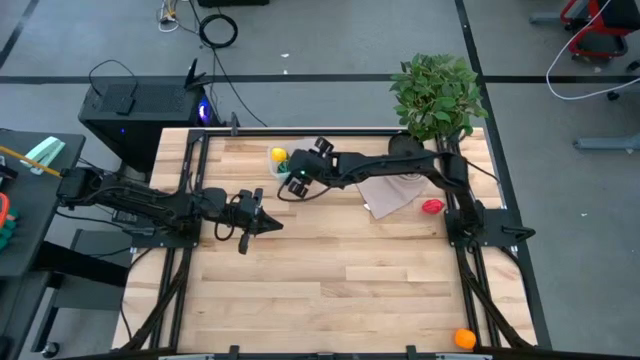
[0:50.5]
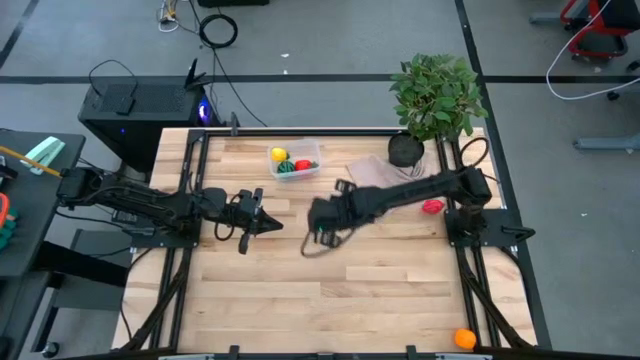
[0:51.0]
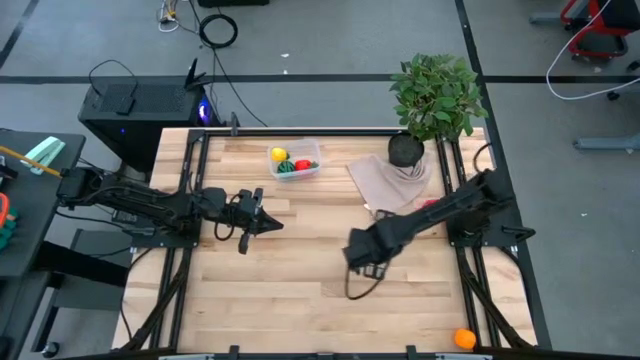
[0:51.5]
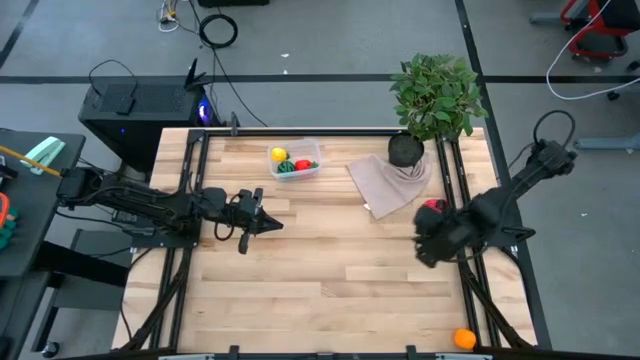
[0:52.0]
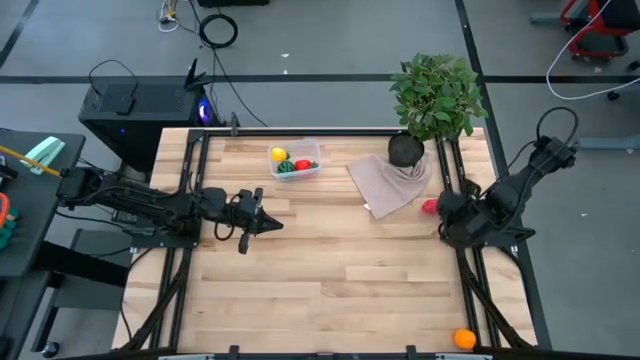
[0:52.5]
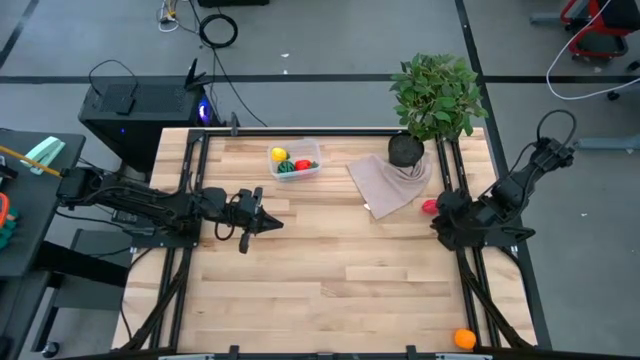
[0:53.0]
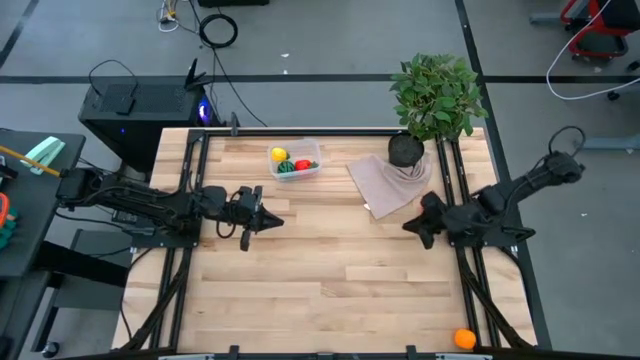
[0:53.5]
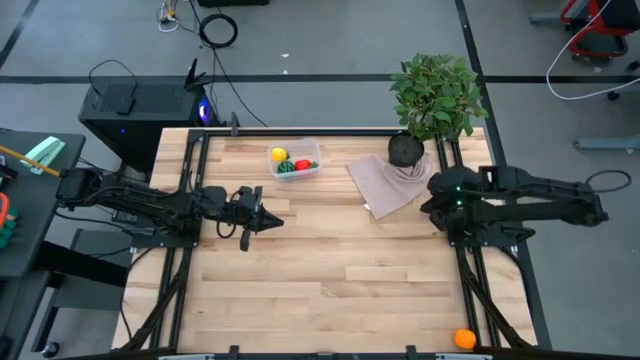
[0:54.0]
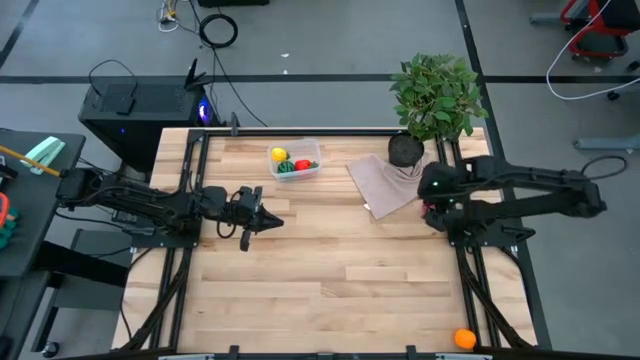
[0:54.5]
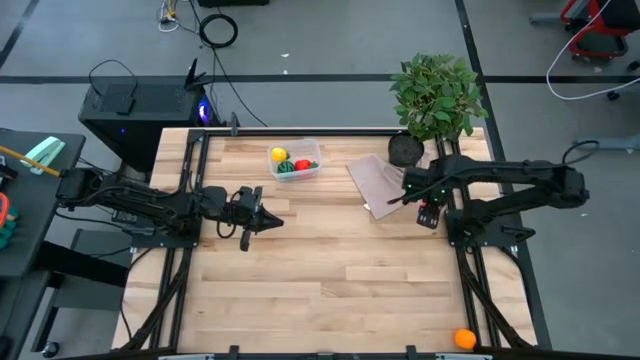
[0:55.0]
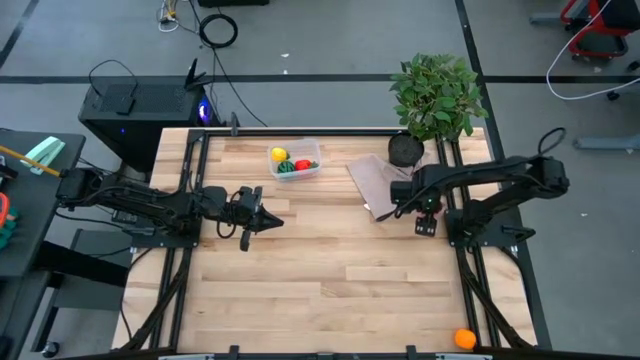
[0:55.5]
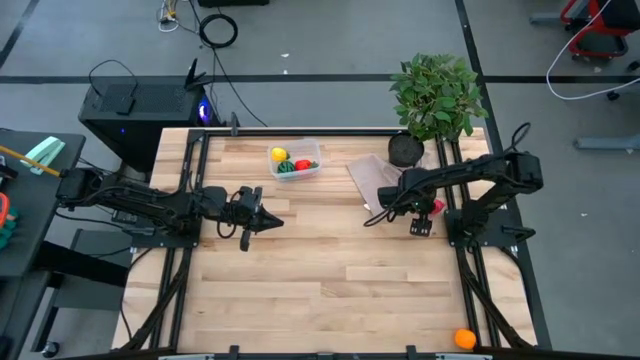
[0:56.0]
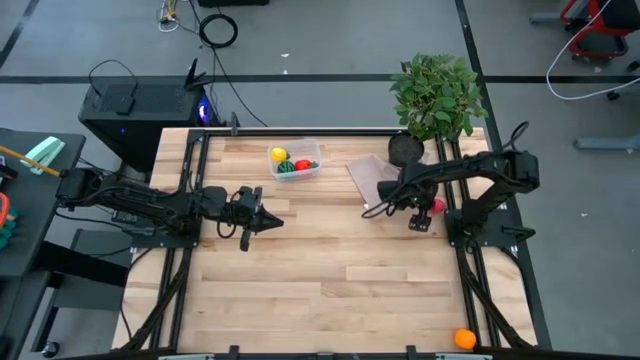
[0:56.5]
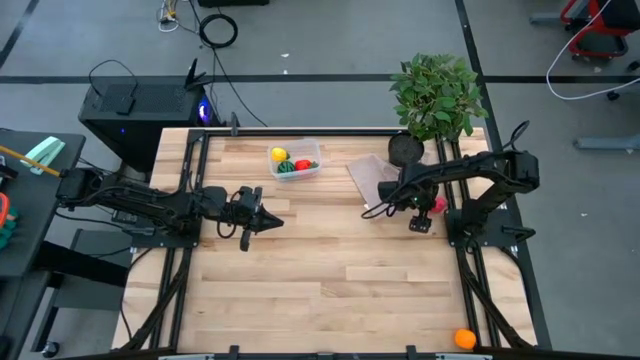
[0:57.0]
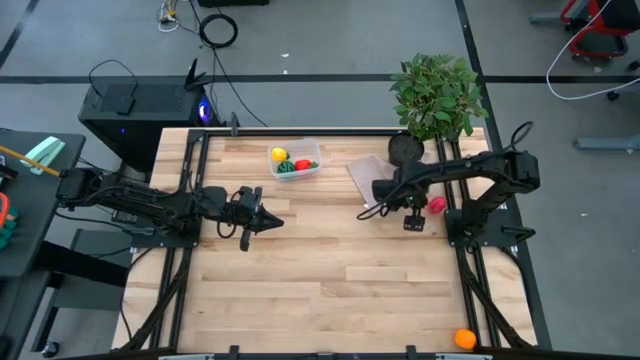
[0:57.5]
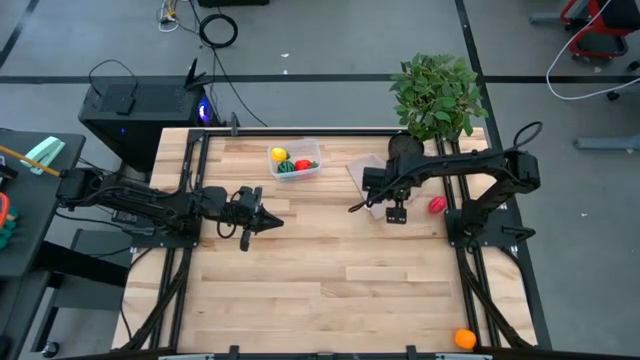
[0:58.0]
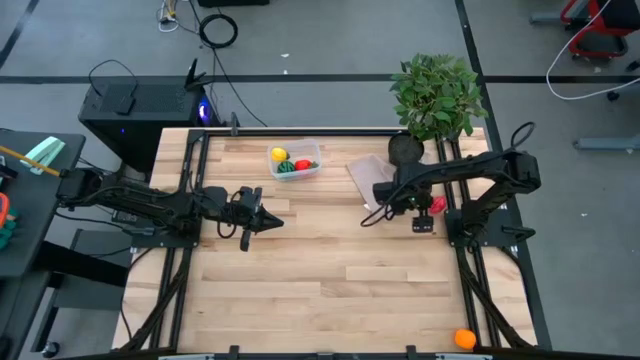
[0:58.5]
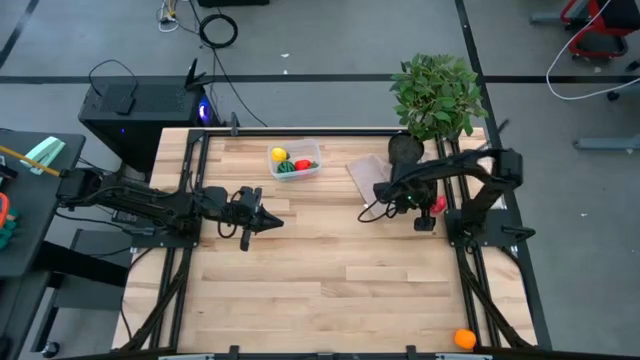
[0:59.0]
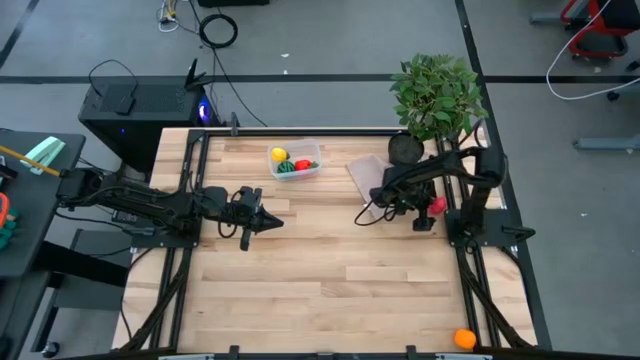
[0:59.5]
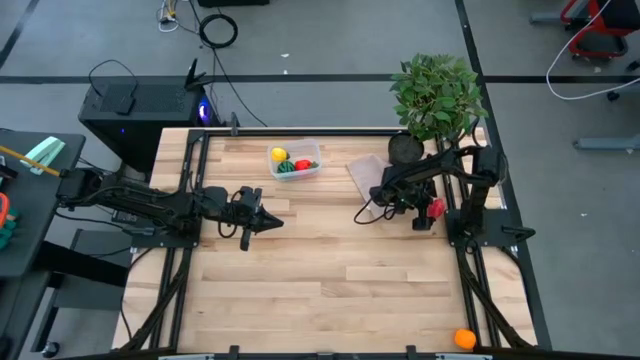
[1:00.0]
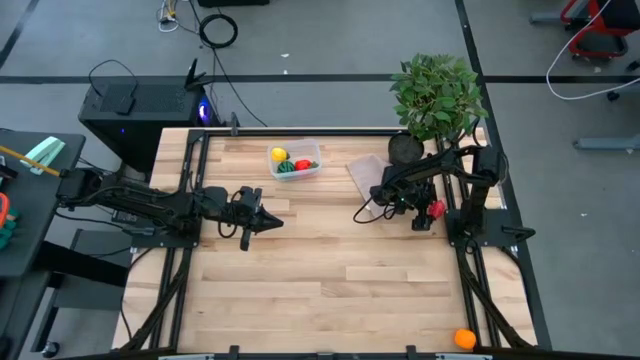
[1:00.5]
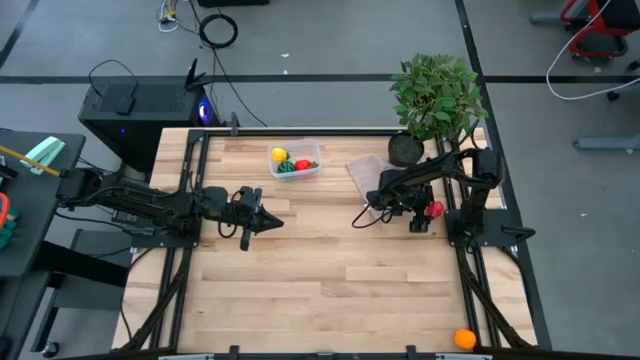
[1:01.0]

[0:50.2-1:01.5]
Task: Pick and placing Produce into tupperware
Put the pink dragon fruit into the container

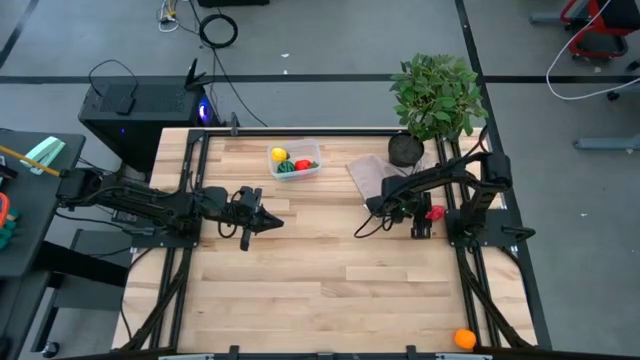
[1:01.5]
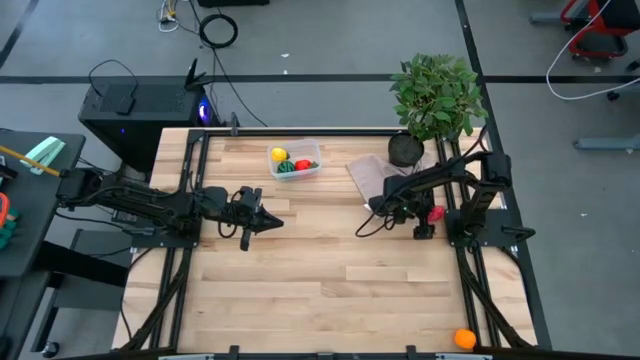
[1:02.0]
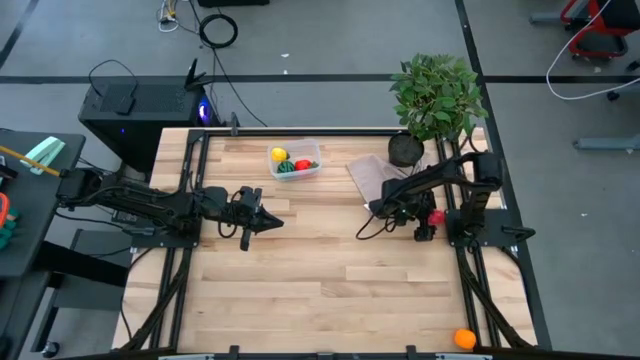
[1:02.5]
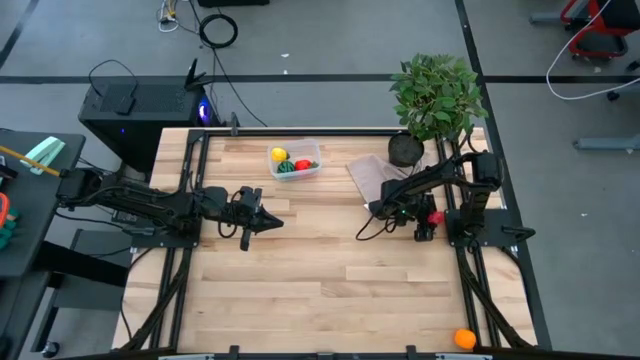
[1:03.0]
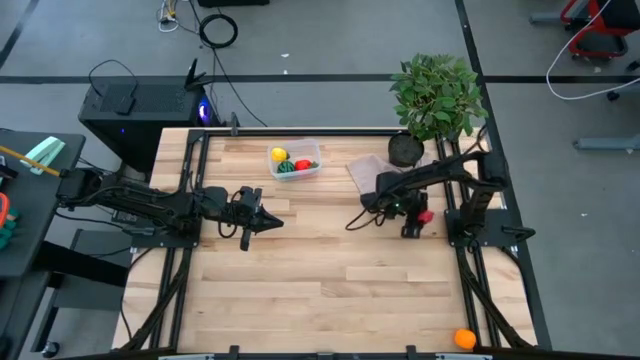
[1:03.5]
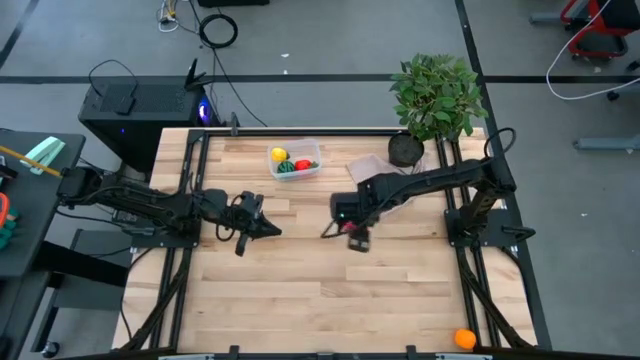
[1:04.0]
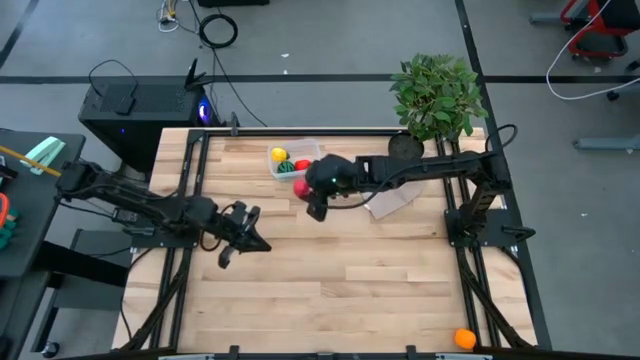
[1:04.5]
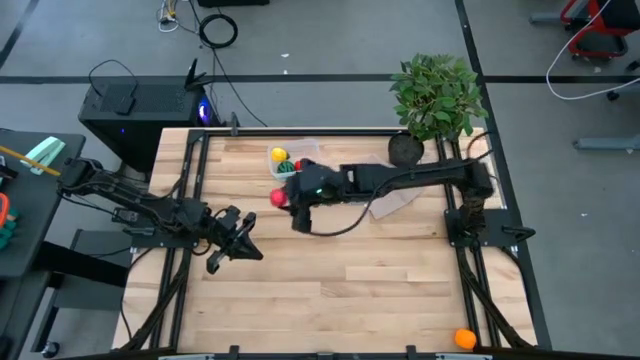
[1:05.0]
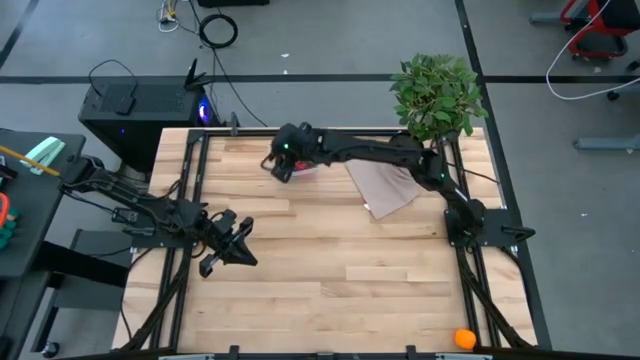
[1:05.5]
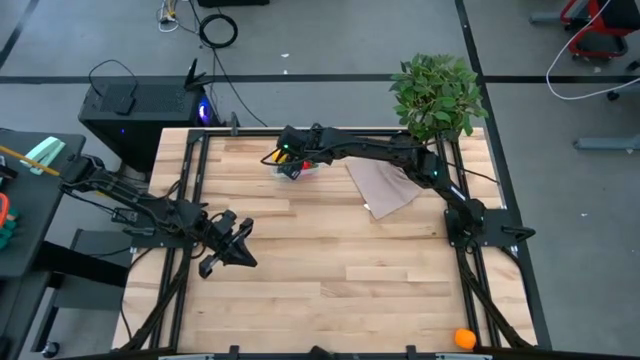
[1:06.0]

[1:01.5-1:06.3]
Put the pink dragon fruit into the container

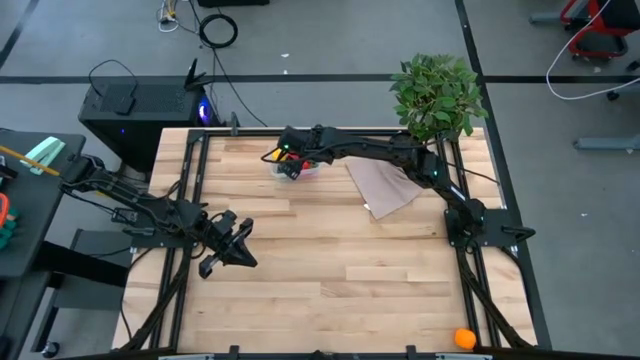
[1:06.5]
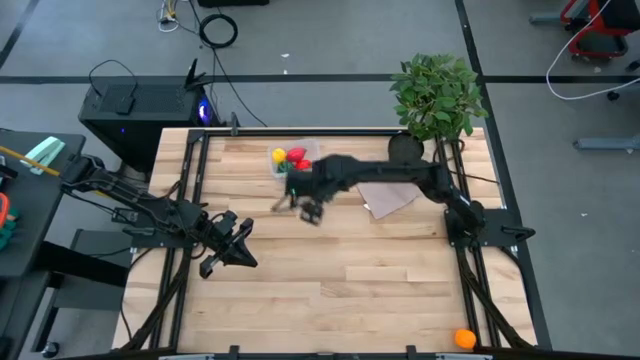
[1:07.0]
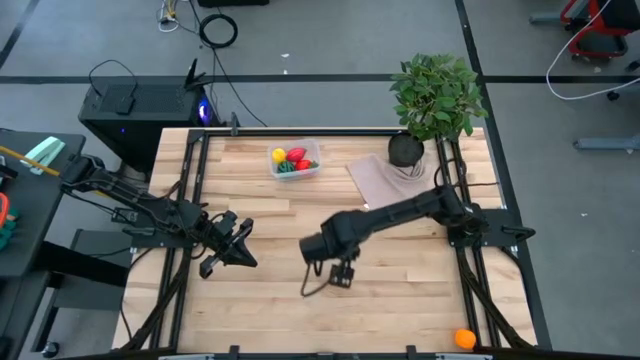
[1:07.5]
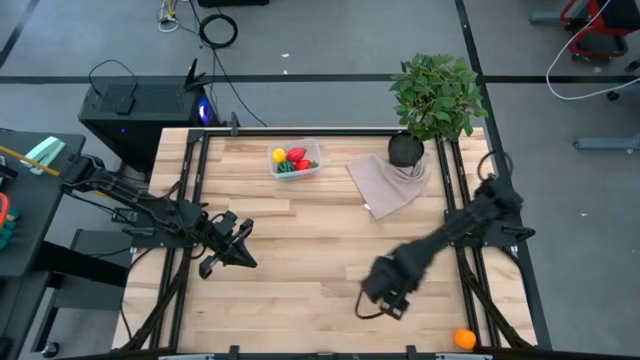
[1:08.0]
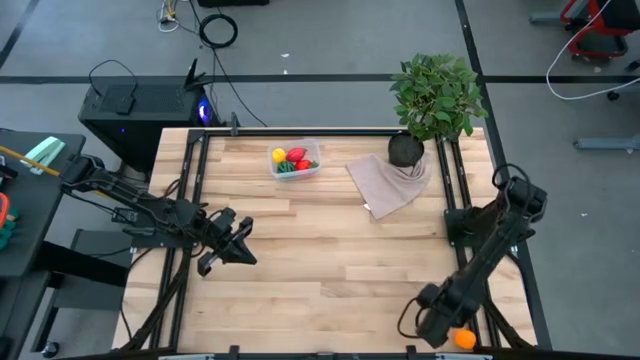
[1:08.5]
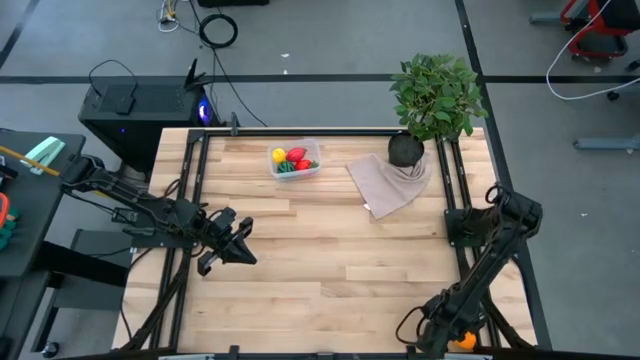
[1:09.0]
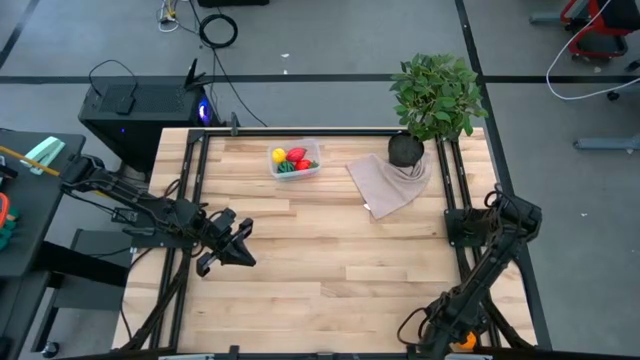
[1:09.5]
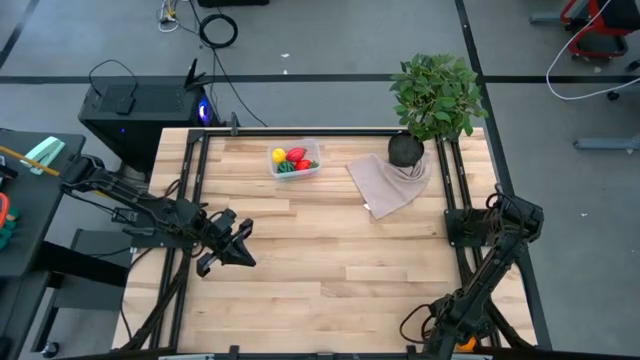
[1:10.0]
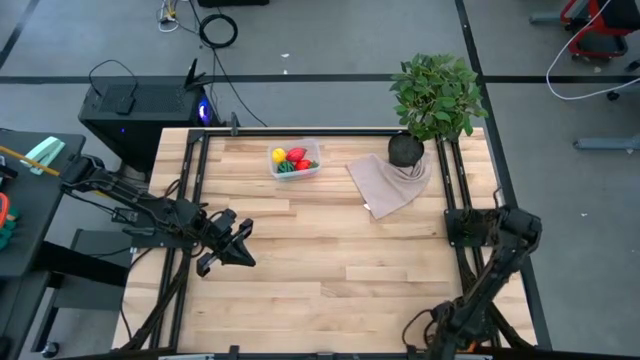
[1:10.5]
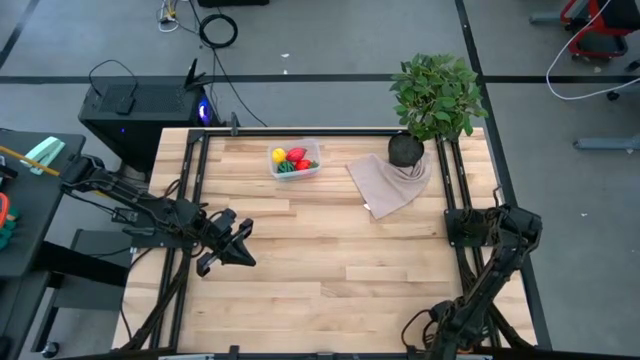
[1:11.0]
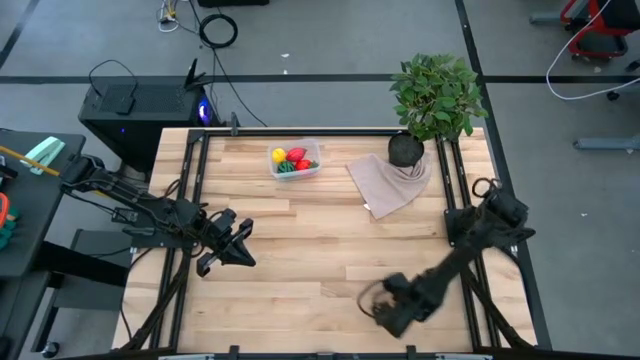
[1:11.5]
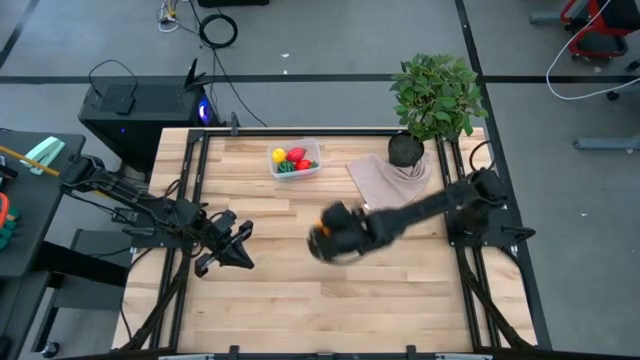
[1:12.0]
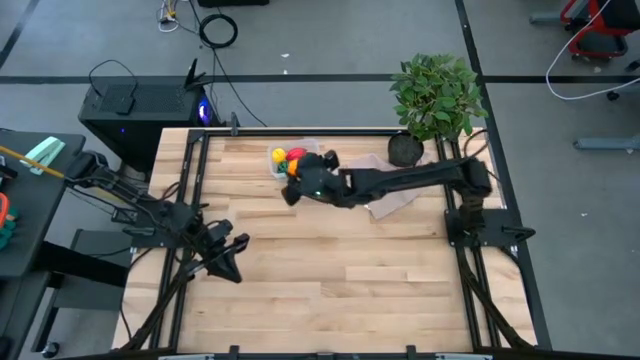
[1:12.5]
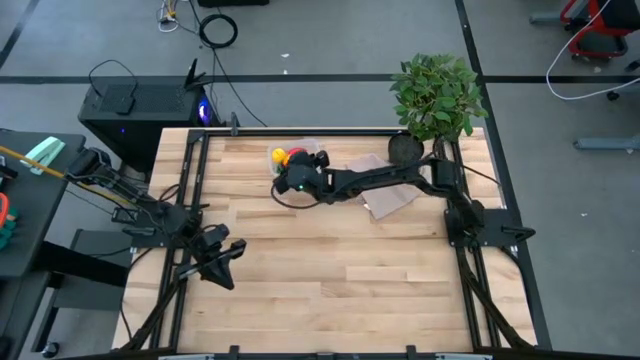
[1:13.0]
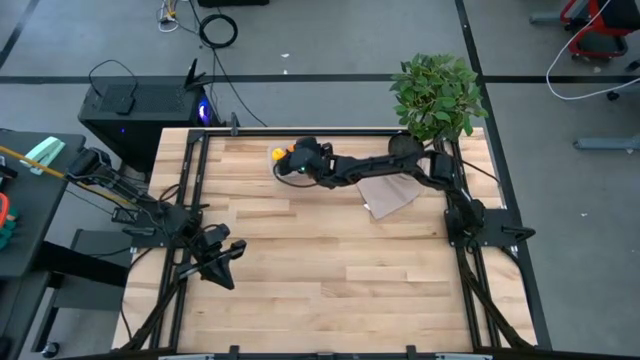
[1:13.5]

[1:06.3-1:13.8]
Put the orange into the container
